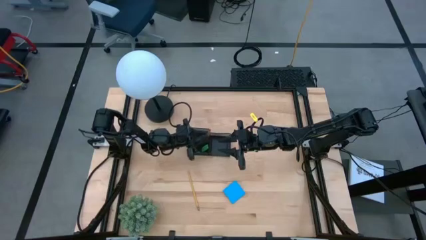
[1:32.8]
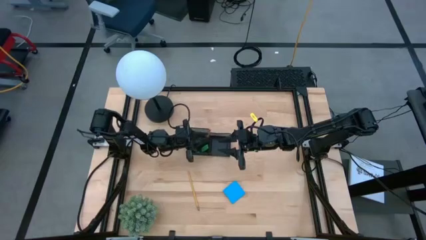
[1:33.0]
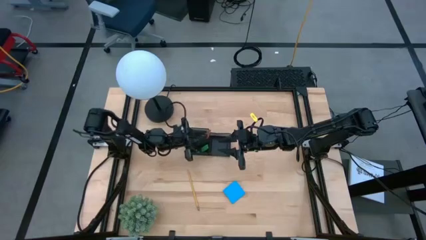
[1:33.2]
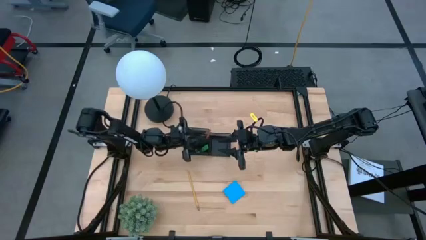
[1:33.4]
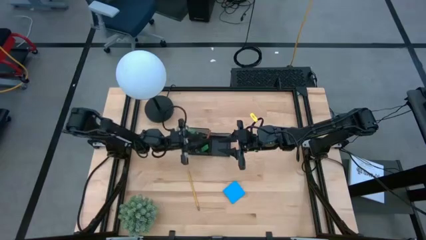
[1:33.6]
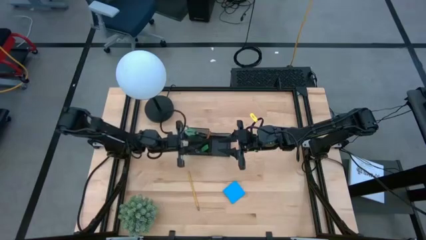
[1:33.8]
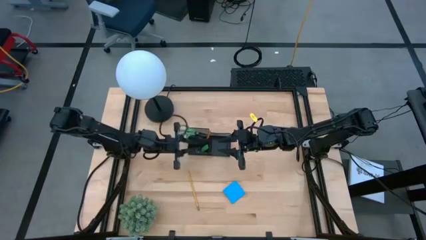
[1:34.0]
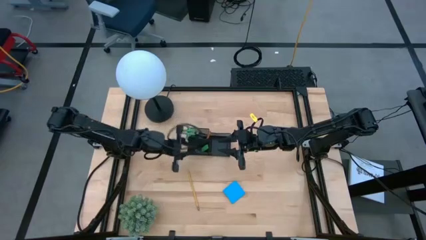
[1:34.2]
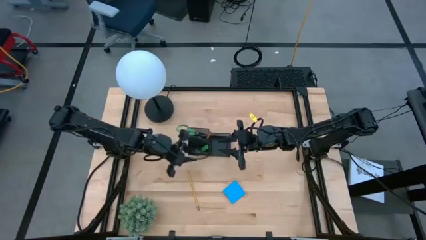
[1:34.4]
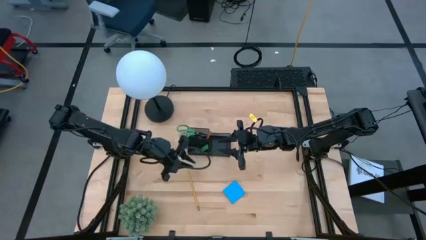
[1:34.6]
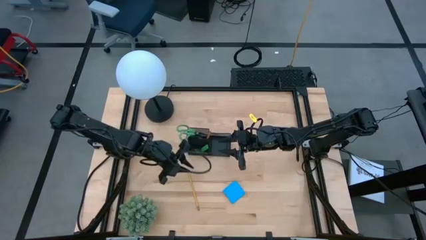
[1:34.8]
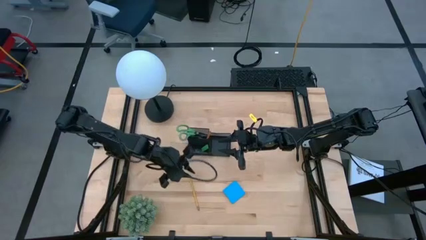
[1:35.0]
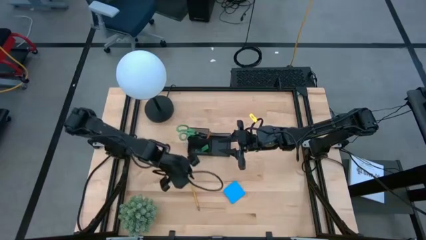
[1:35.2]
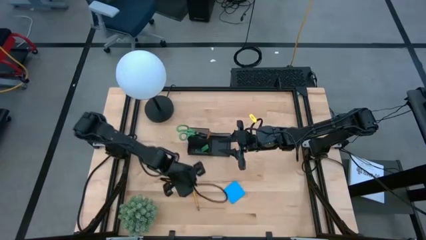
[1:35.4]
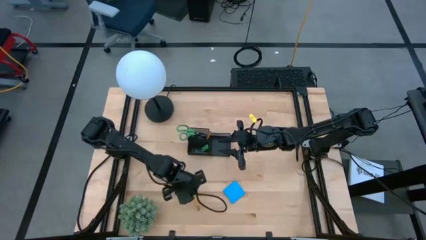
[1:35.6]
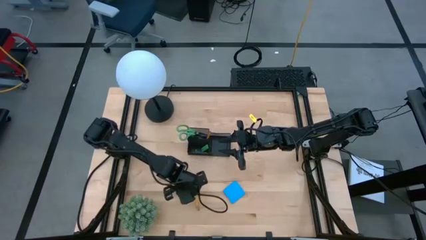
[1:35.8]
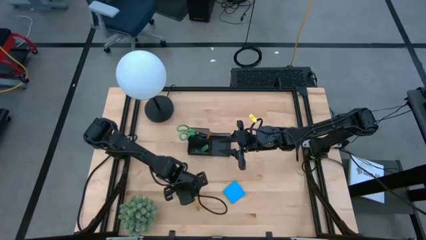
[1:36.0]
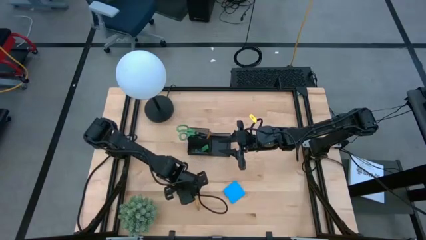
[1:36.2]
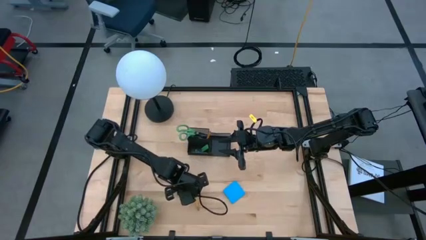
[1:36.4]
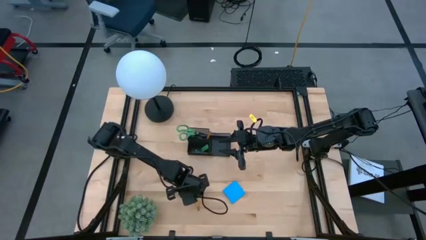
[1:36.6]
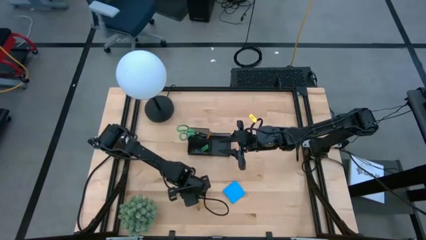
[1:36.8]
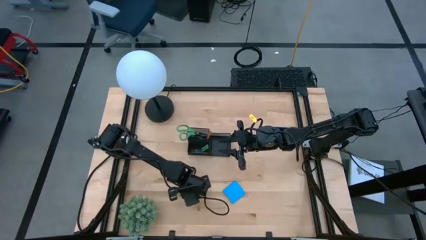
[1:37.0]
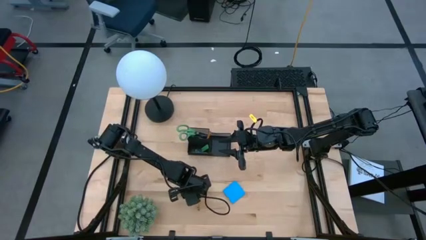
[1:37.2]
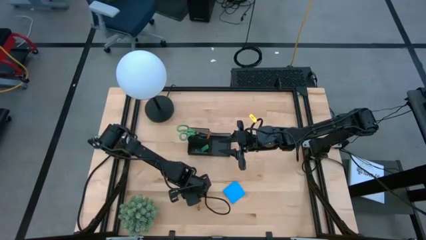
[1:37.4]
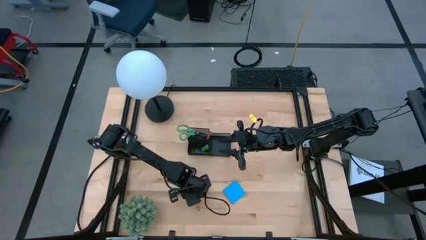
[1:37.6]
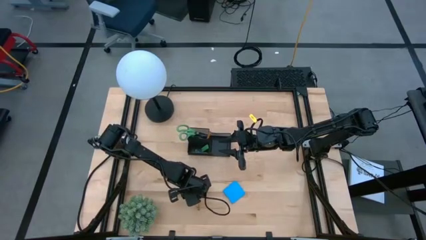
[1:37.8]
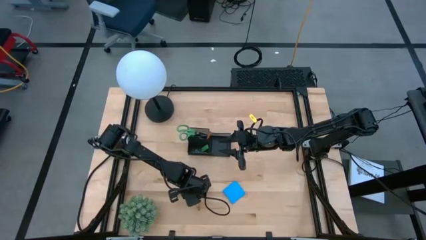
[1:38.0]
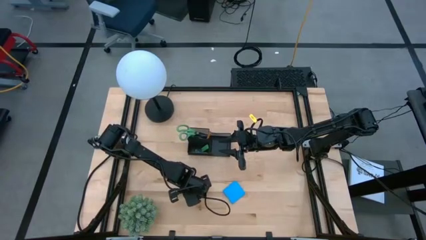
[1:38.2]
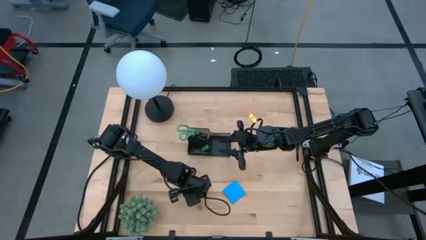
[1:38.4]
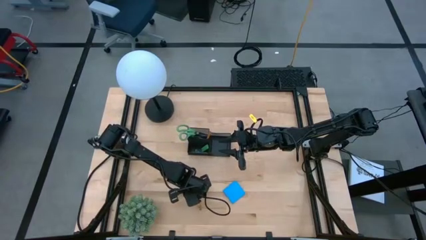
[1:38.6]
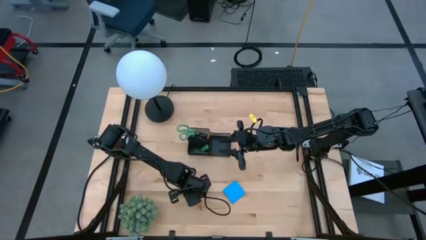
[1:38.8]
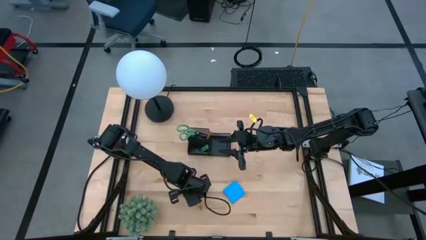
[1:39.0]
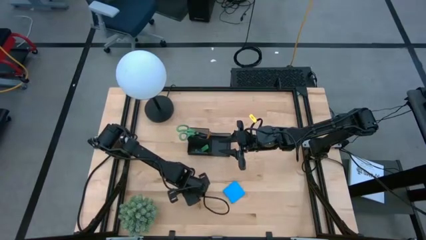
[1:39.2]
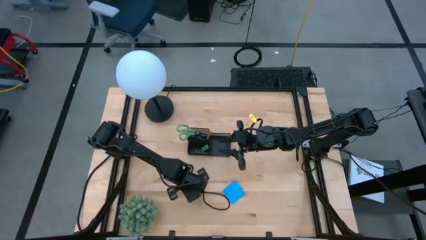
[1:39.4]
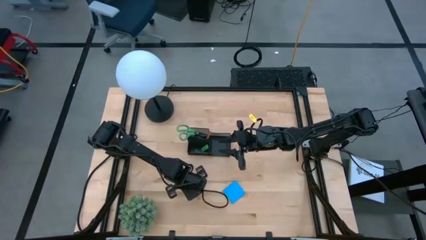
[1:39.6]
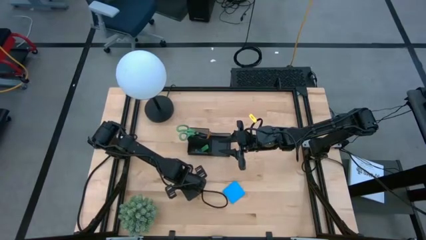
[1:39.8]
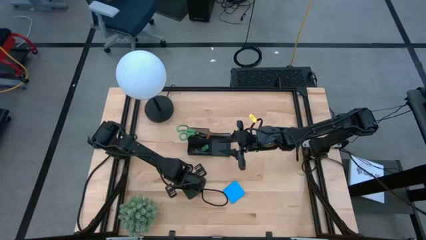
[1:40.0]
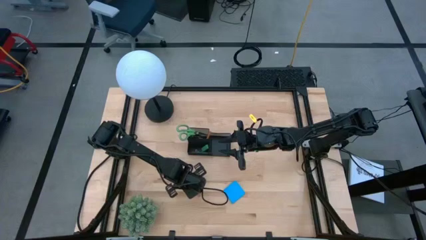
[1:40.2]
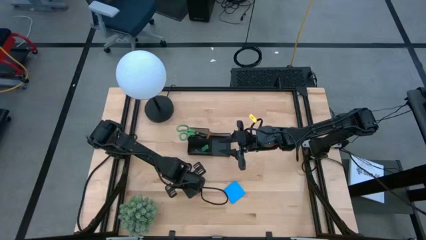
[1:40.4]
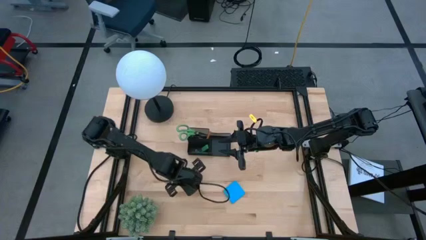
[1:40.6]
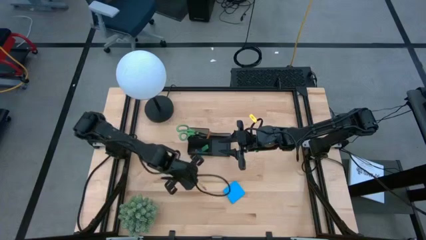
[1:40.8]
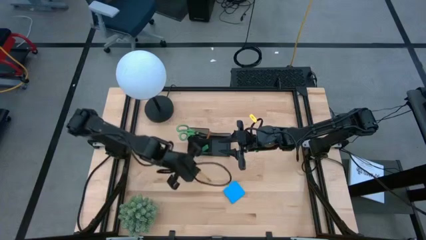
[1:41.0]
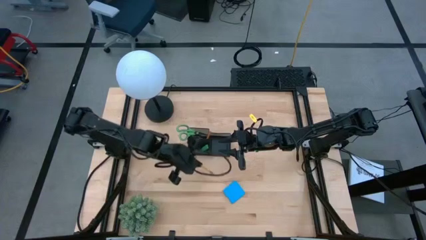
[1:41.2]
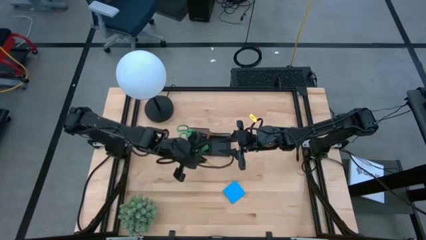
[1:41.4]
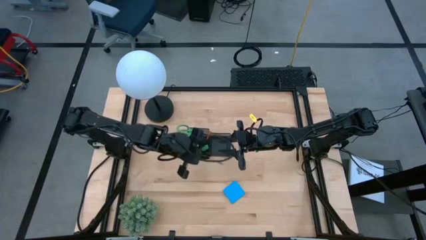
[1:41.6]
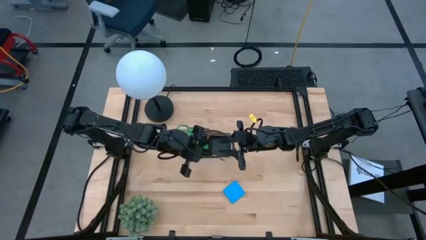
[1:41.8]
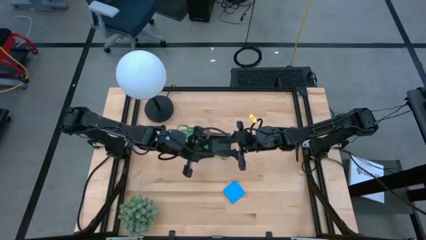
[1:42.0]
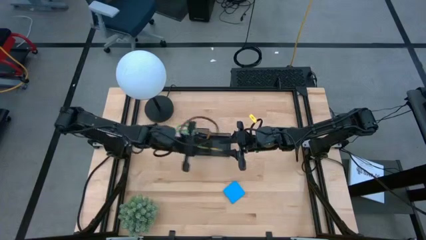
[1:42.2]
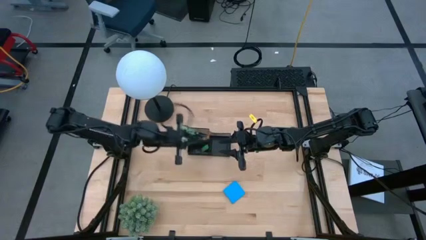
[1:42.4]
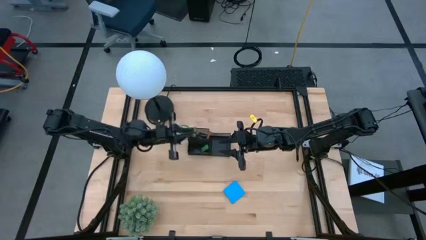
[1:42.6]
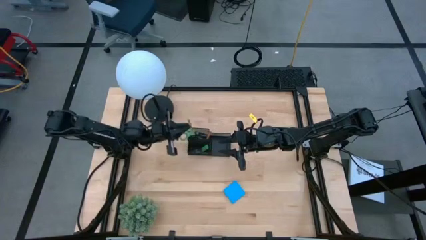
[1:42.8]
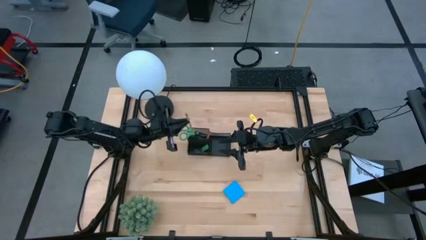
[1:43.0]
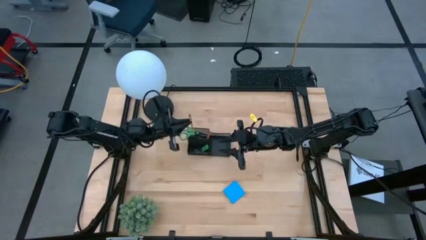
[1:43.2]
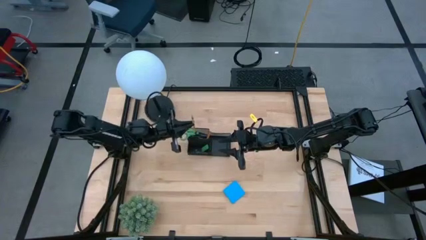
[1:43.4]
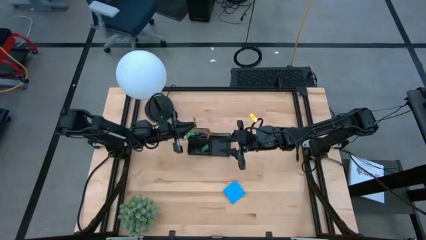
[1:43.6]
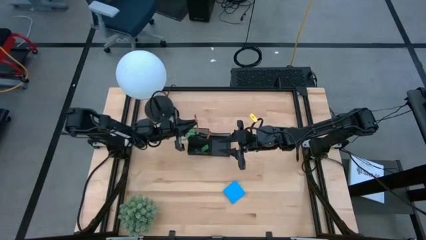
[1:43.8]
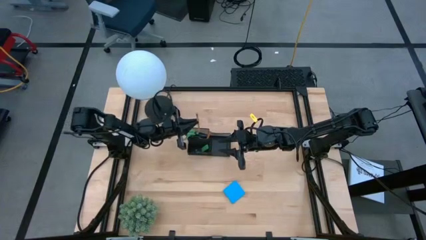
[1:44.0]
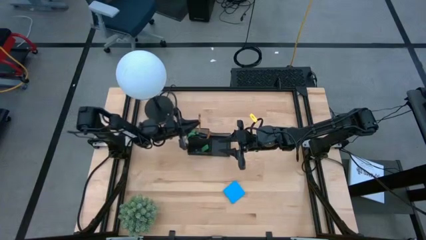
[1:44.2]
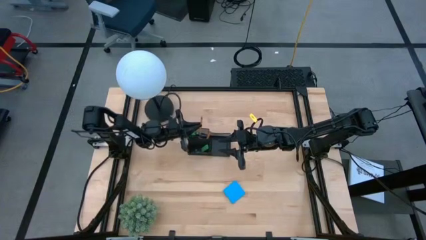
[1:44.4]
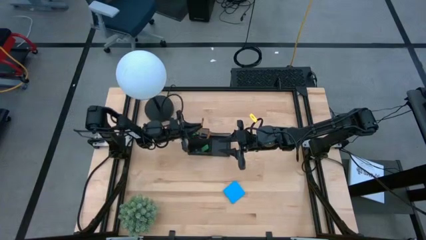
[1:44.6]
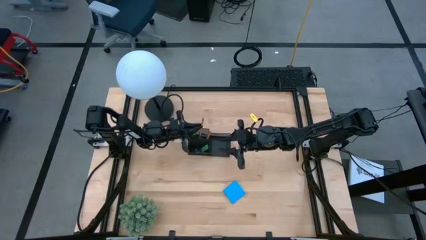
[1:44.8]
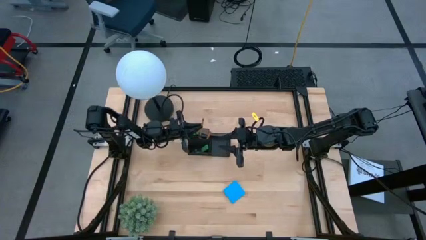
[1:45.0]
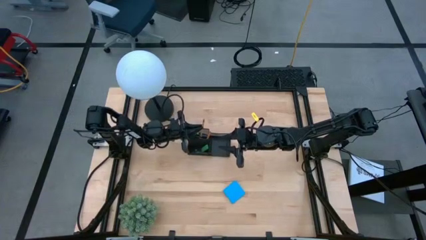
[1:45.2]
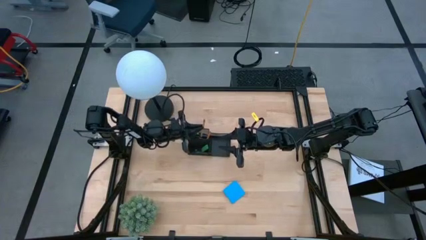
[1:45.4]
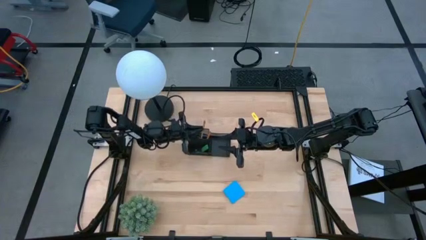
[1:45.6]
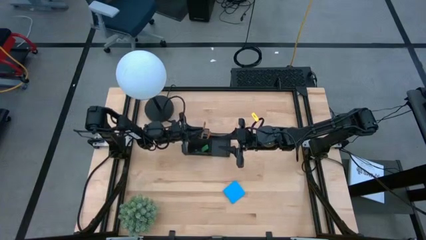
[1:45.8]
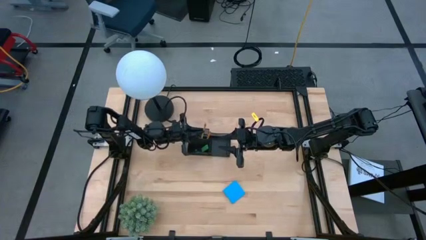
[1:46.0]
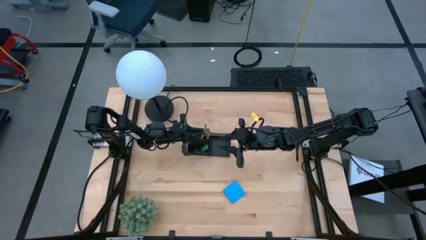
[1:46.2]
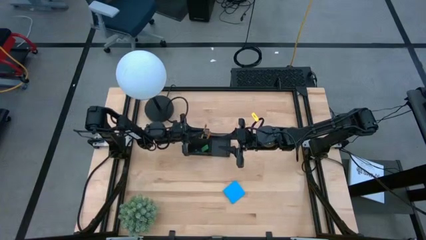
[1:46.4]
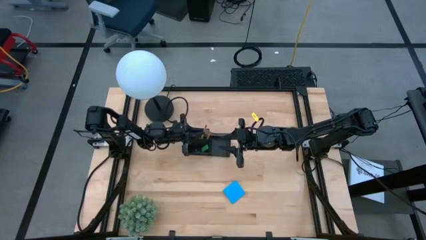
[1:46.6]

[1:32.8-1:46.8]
Task: Pick and place office supplies into organizer
Put the yellow pencil into the black desk organizer
